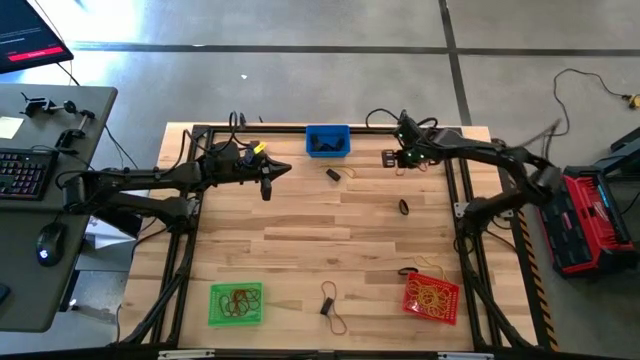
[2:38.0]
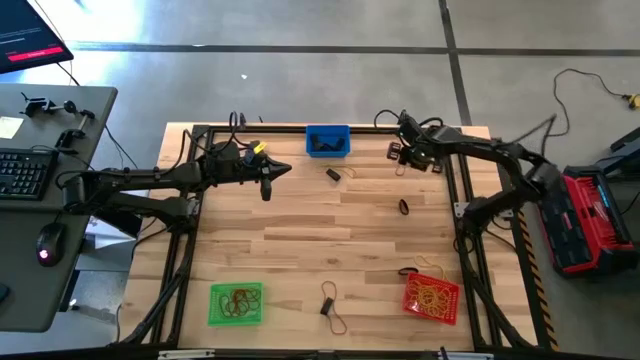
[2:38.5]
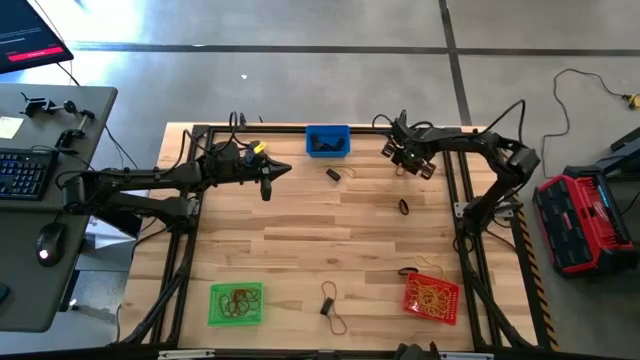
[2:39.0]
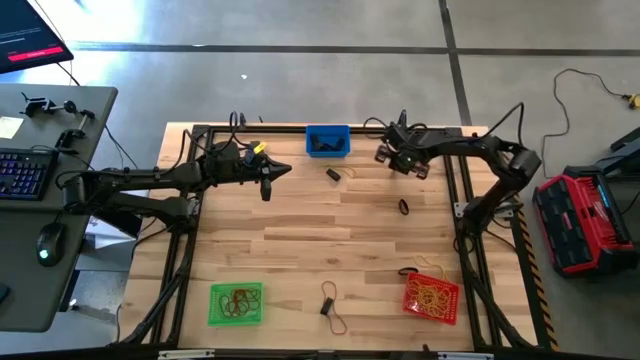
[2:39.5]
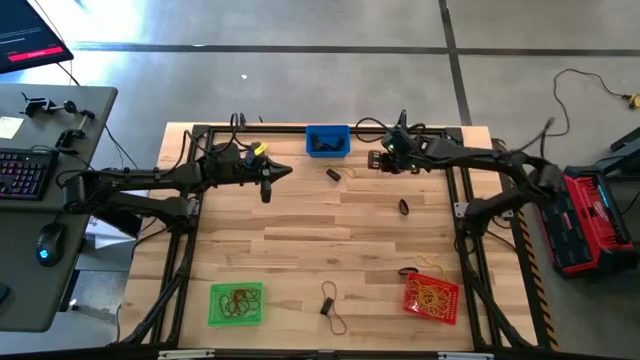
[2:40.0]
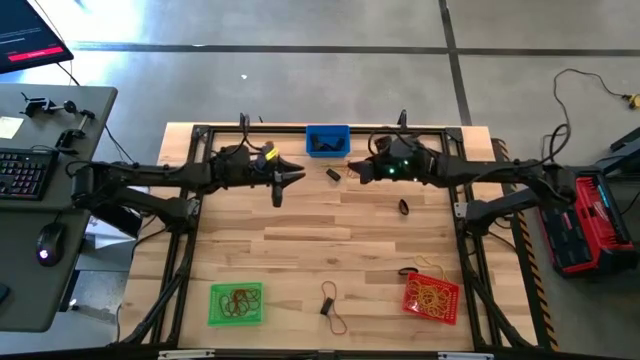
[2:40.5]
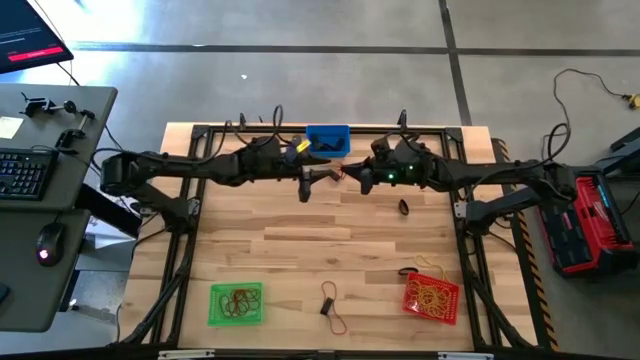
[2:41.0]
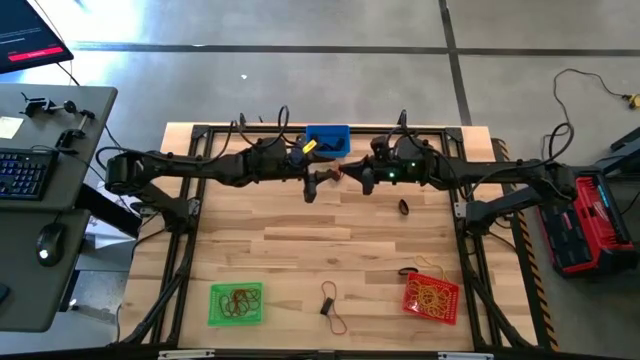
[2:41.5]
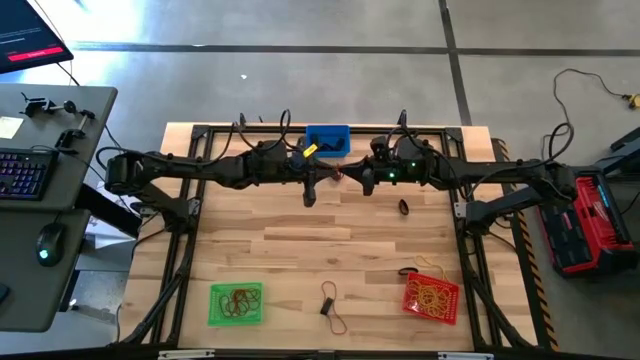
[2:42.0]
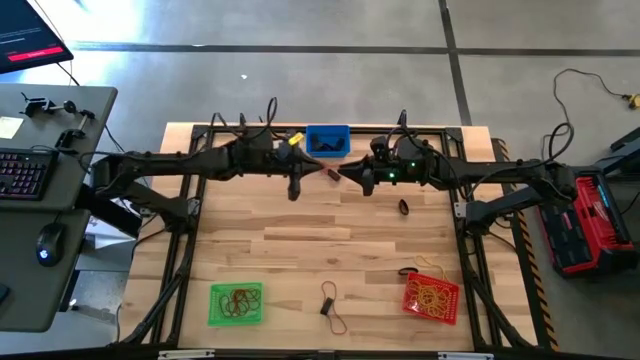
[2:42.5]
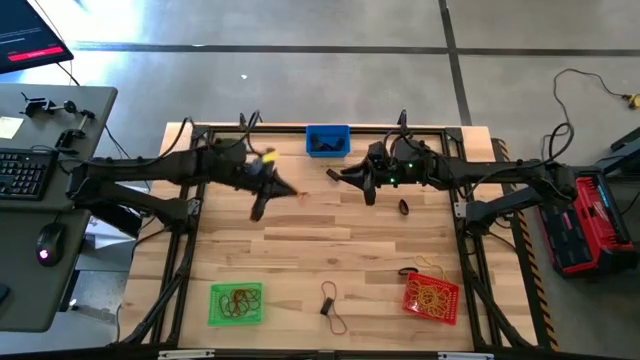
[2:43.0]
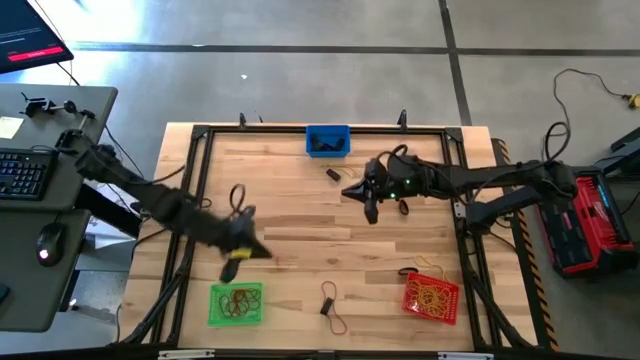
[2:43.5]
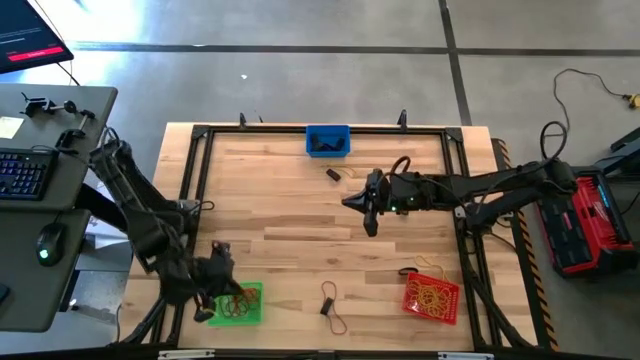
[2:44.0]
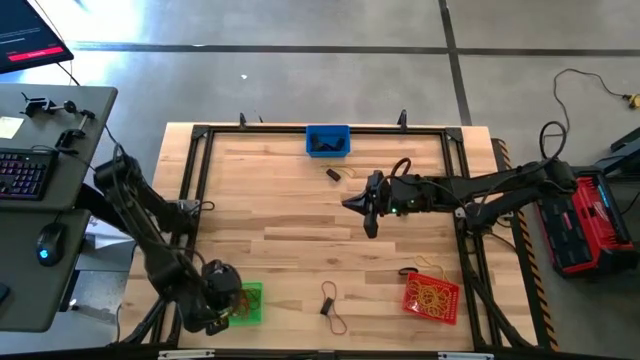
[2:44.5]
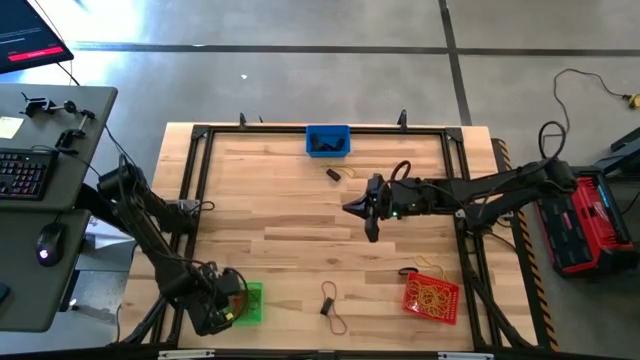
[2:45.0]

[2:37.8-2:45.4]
Task: Sort rubber bands into baskets
Put the red rubber band into the green basket

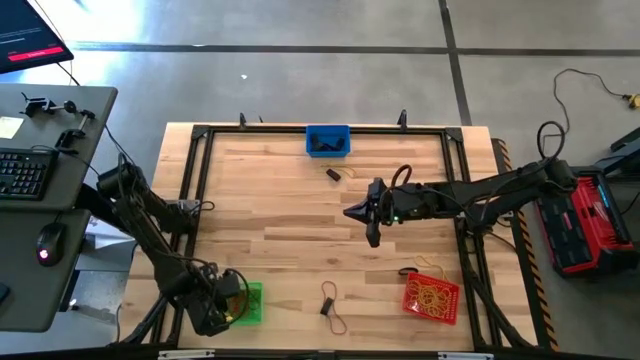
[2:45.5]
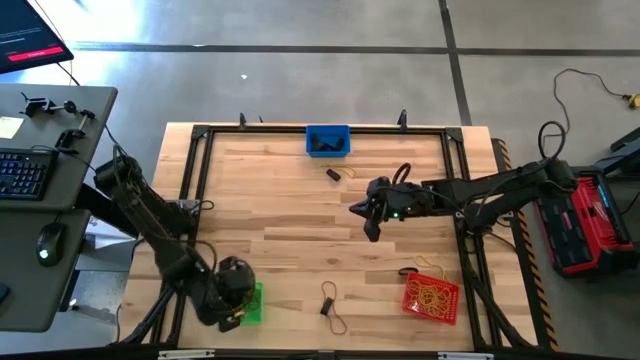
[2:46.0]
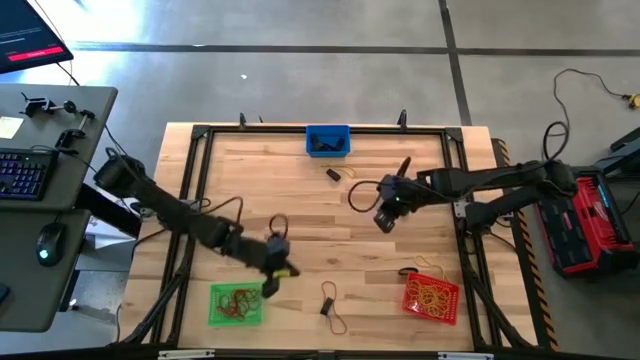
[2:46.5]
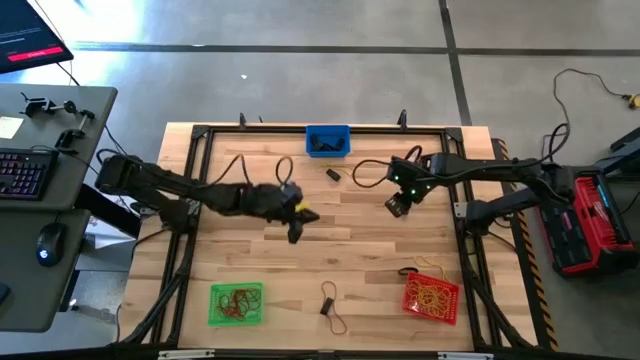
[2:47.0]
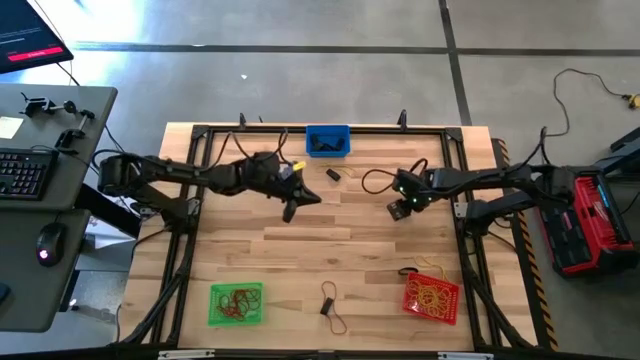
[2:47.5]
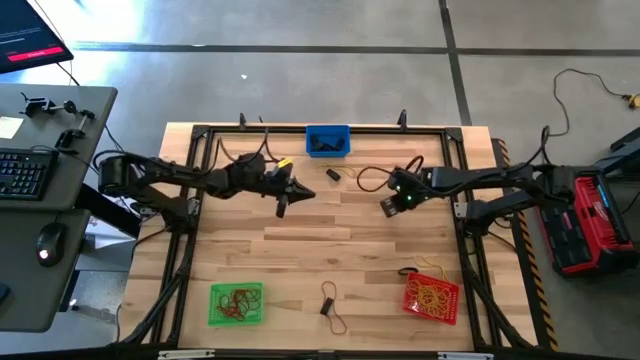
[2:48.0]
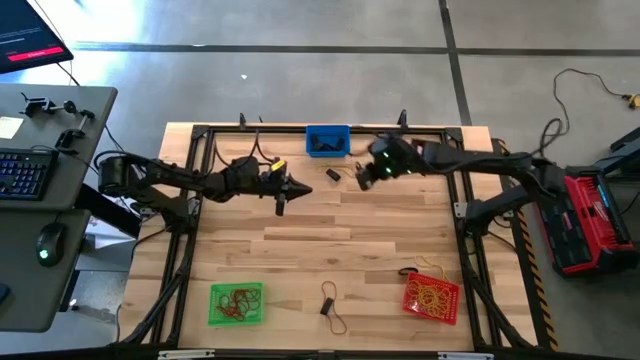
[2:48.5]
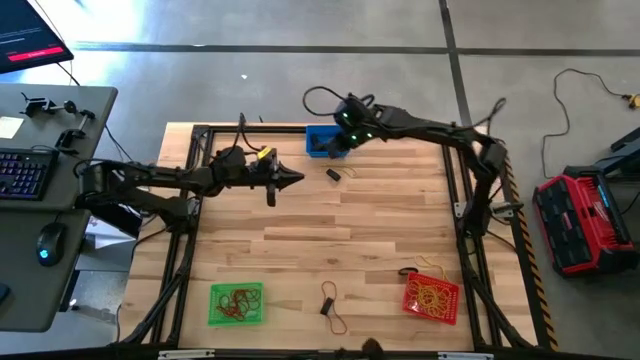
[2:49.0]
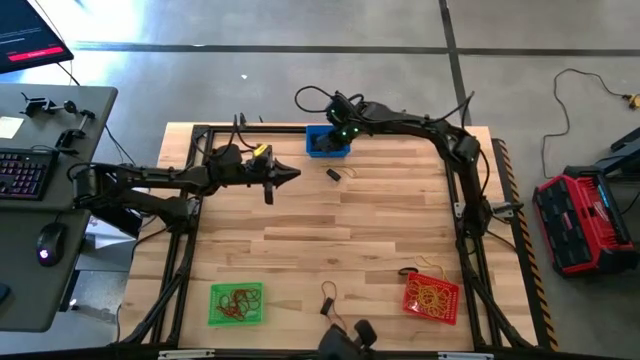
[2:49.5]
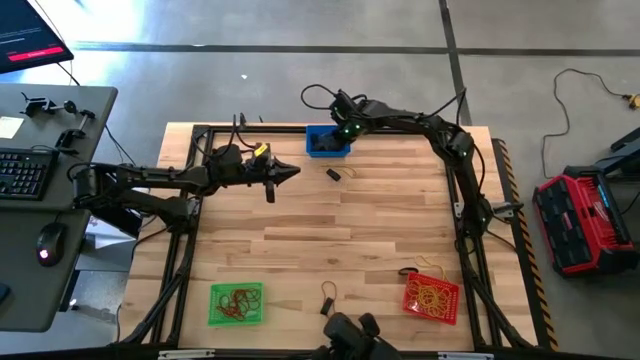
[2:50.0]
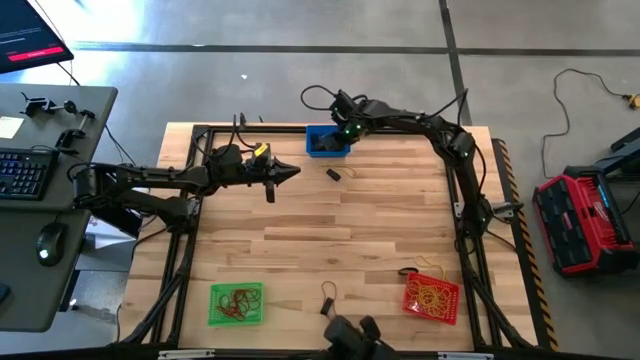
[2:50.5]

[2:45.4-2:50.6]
Put the black rubber band into the blue basket

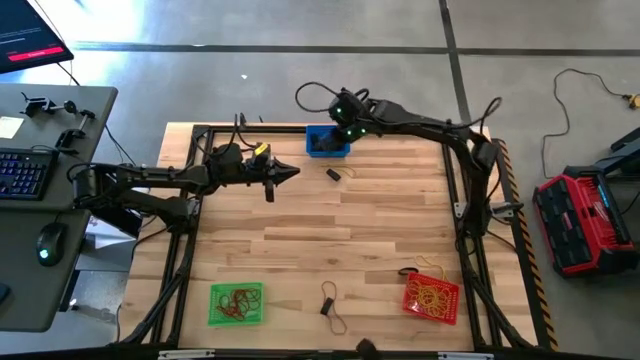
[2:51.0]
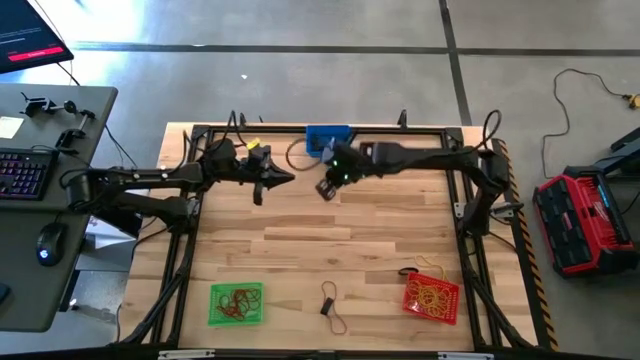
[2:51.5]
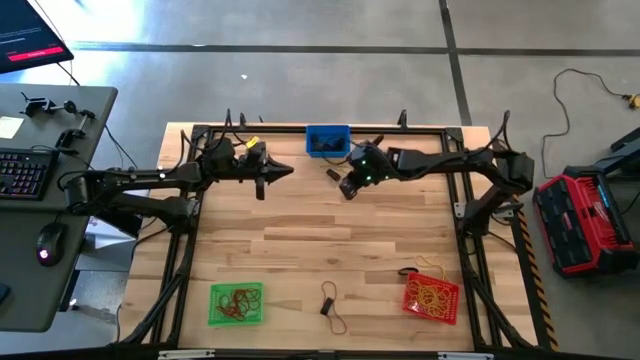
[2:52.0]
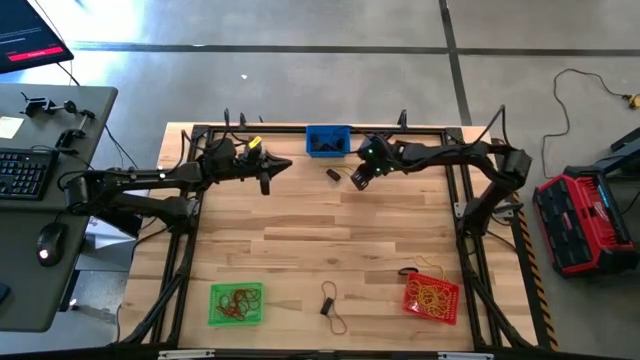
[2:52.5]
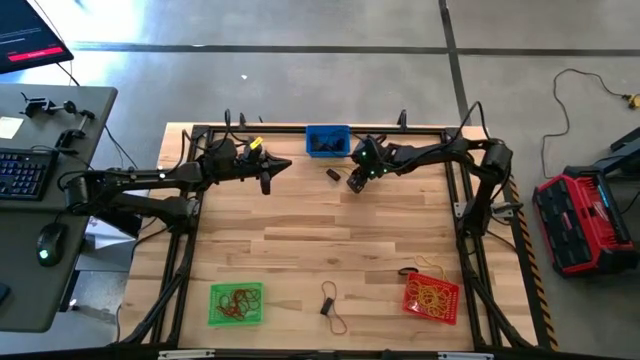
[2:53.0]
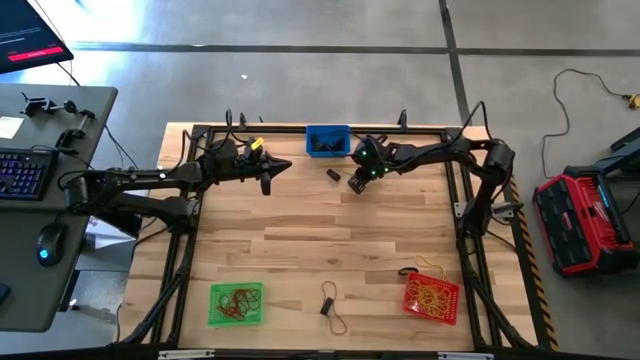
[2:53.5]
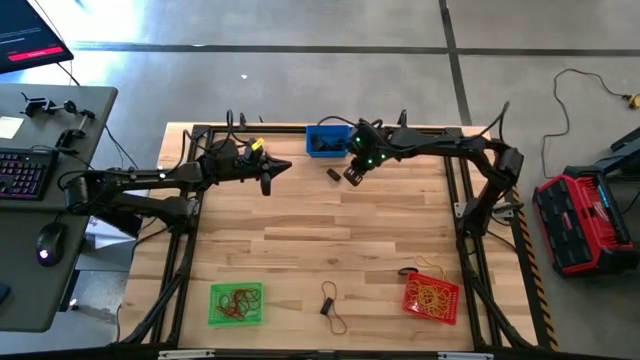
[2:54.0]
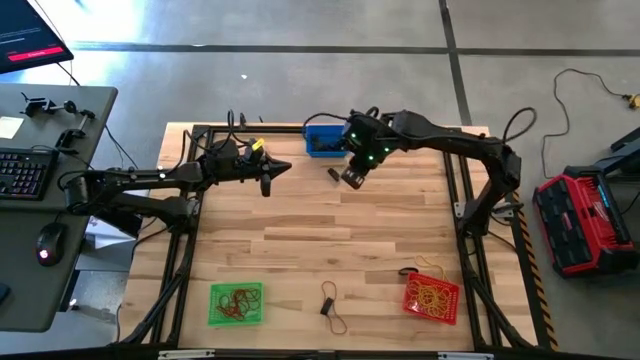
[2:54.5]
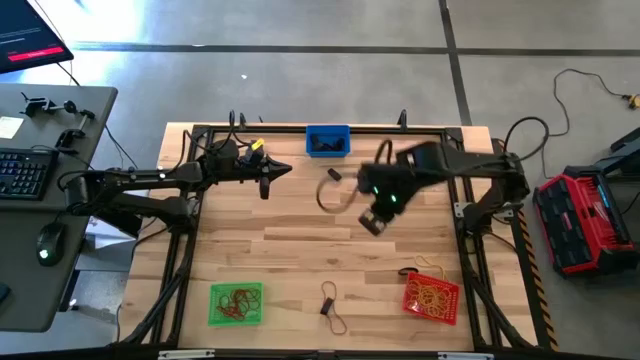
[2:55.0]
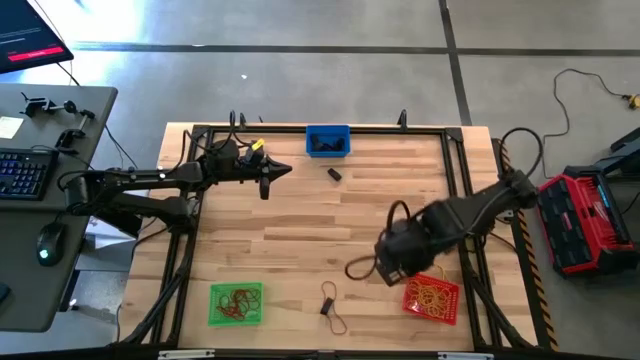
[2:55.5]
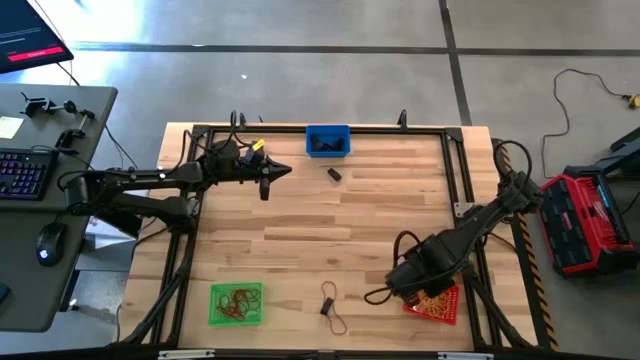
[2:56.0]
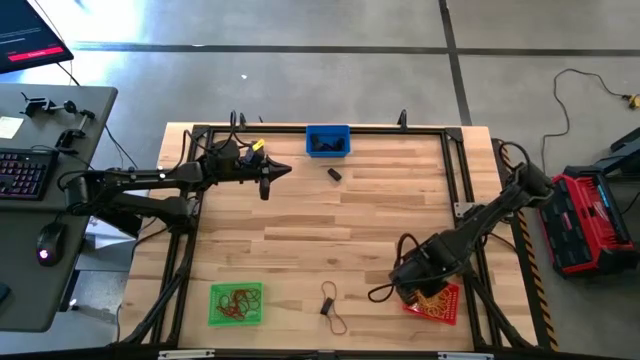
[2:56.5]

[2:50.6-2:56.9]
Put the yellow rubber band into the red basket
